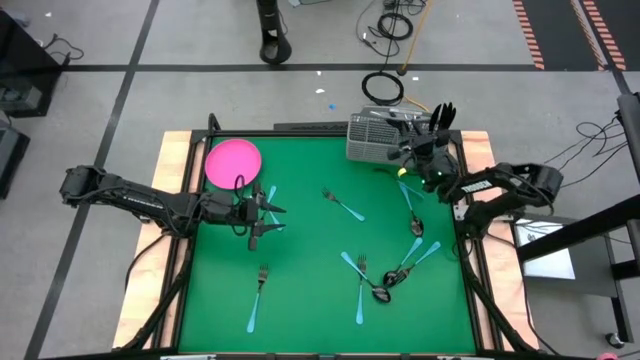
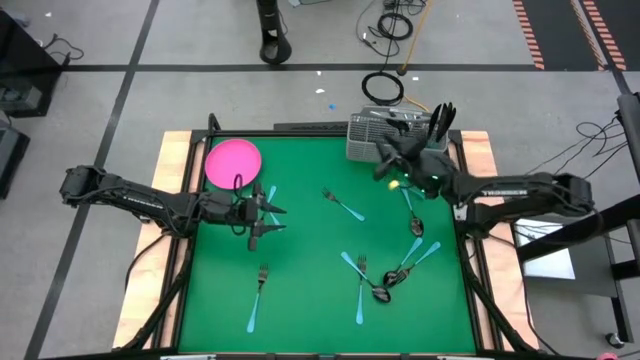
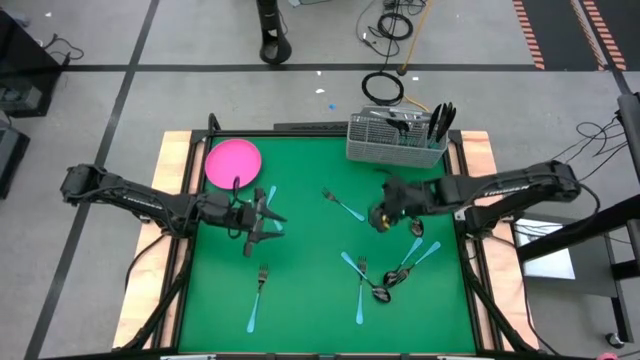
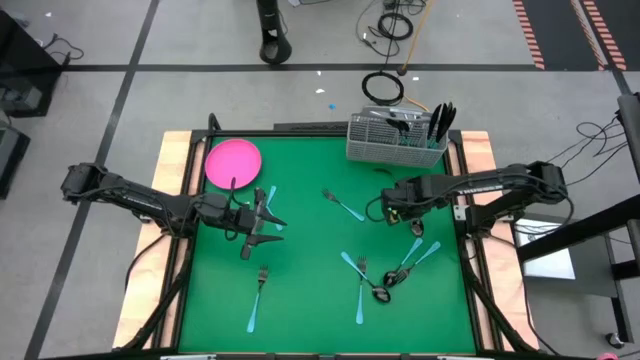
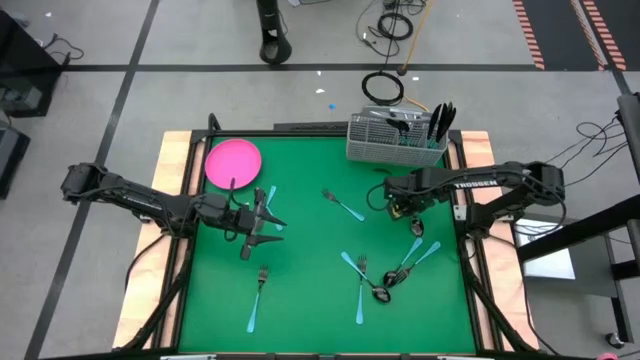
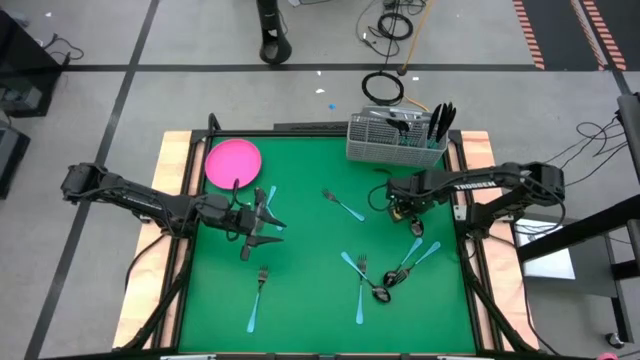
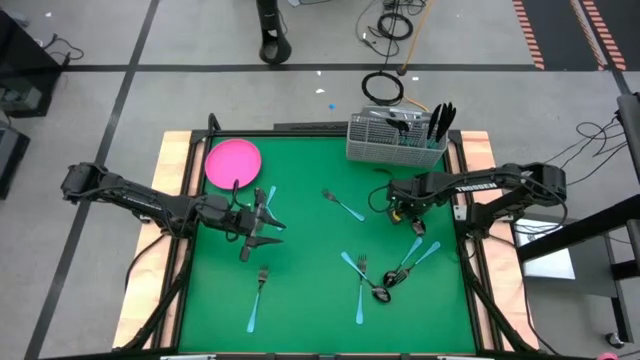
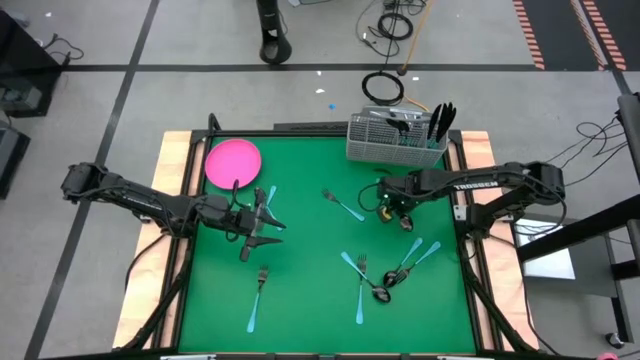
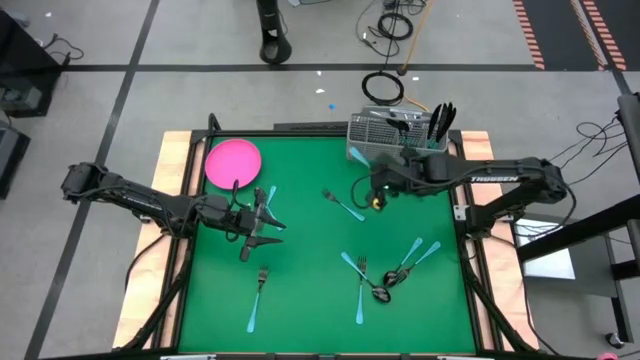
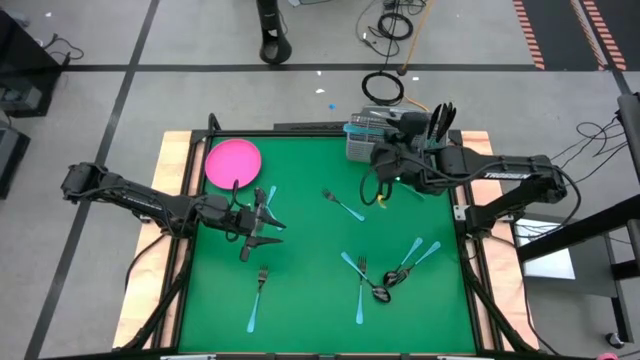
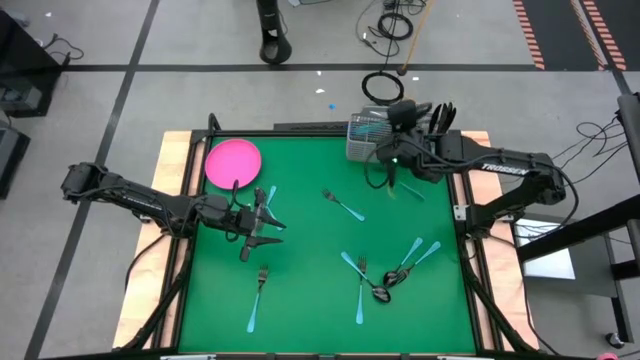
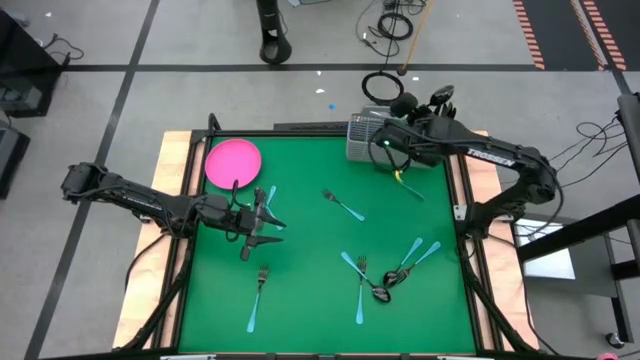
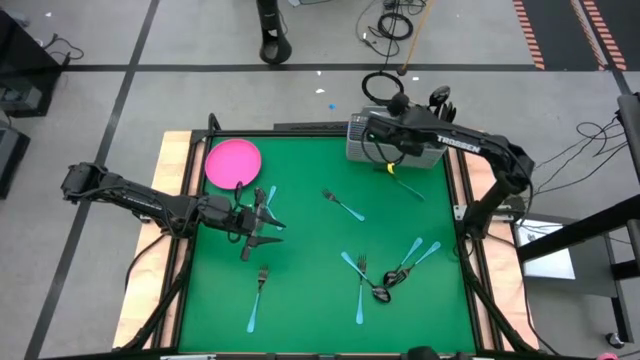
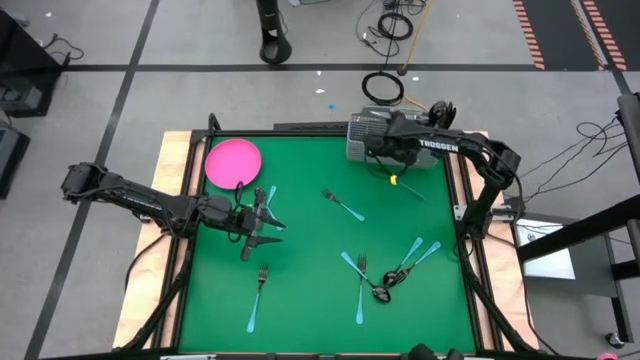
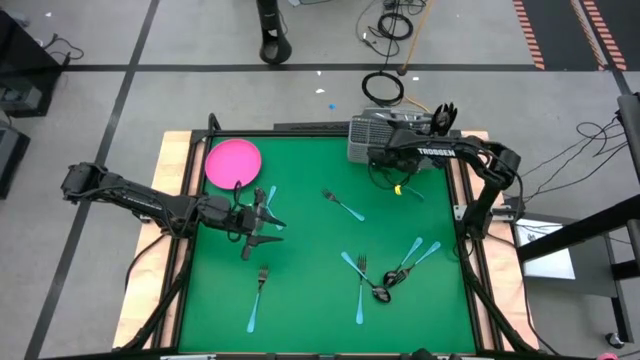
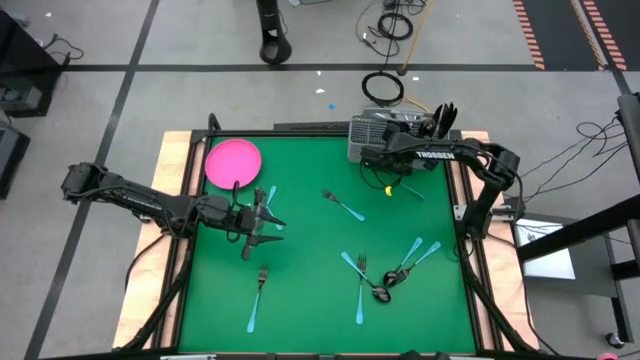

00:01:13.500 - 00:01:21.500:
Task: Sort silverware
Put the blue spoon into the gray silverware basket

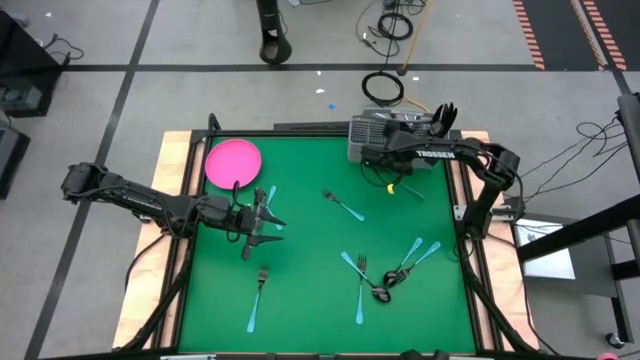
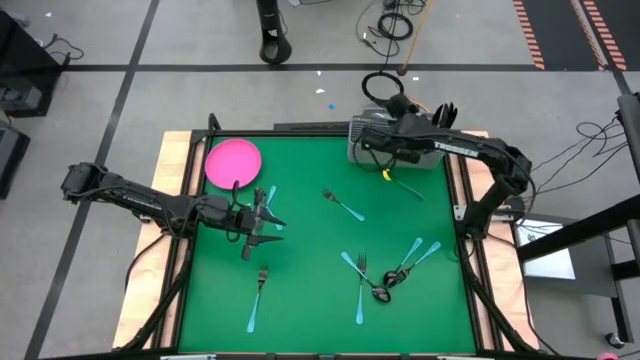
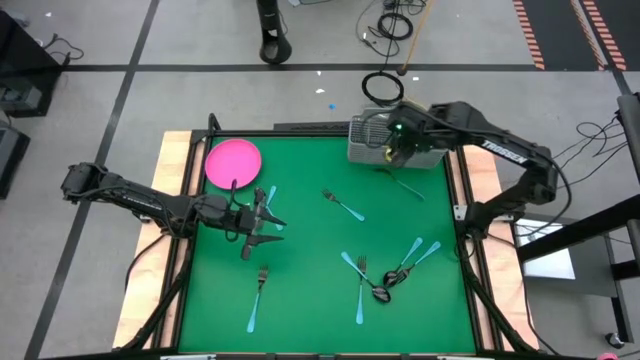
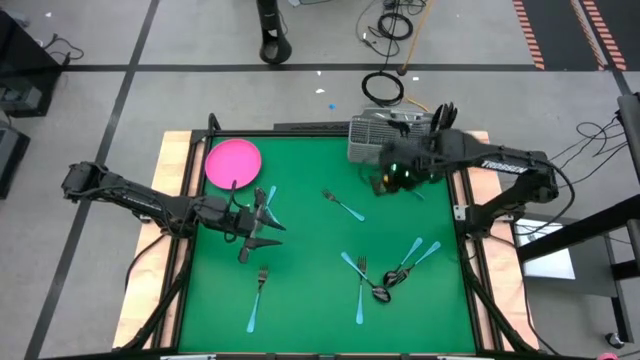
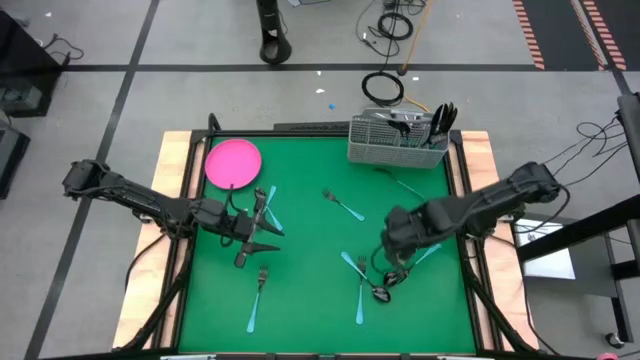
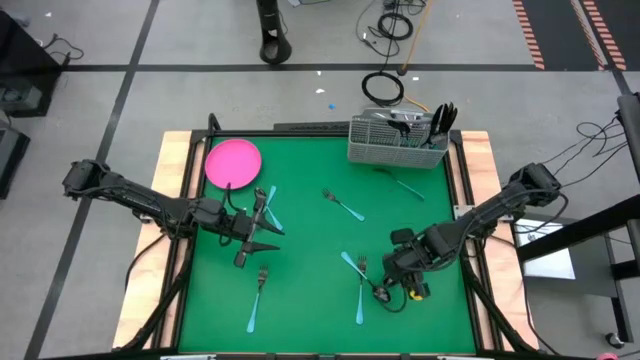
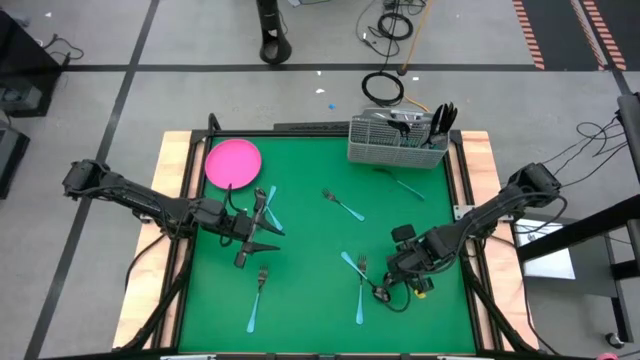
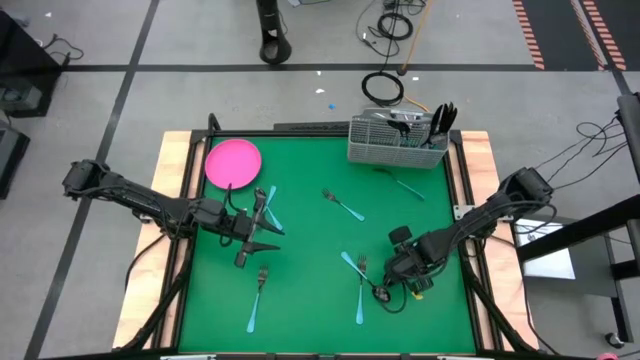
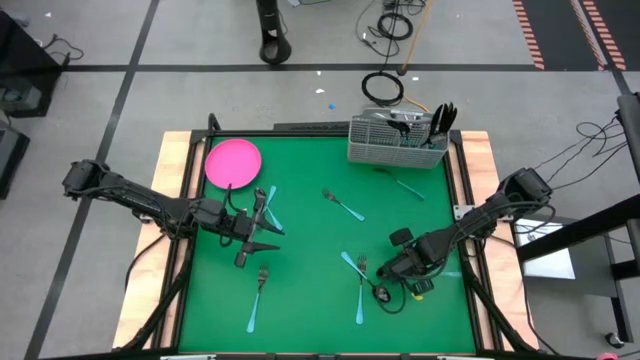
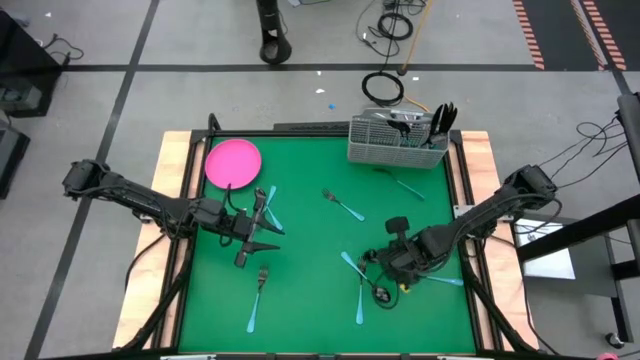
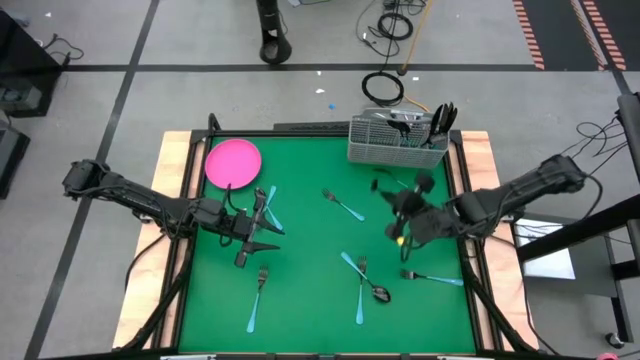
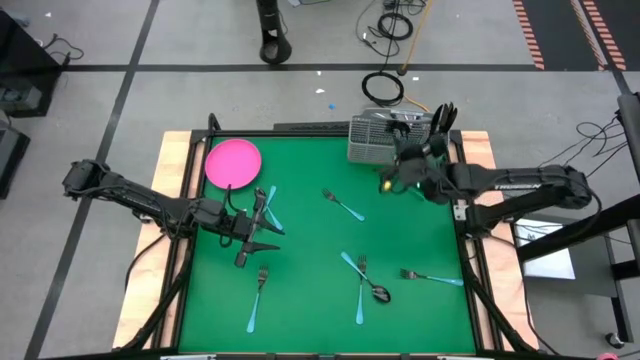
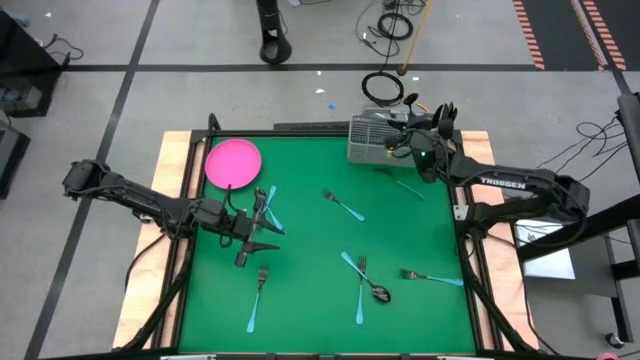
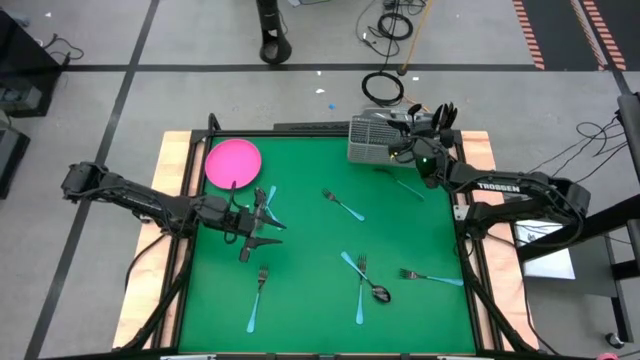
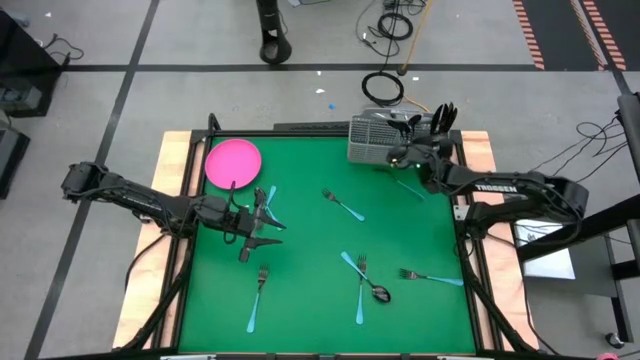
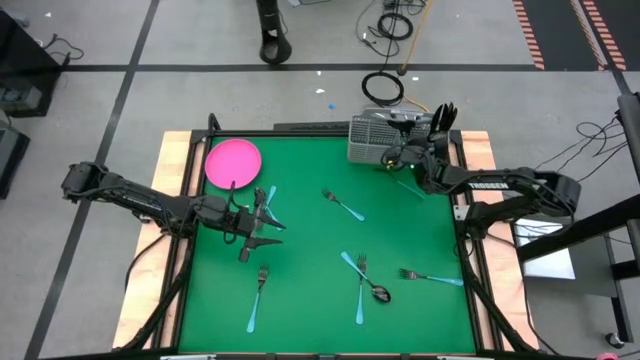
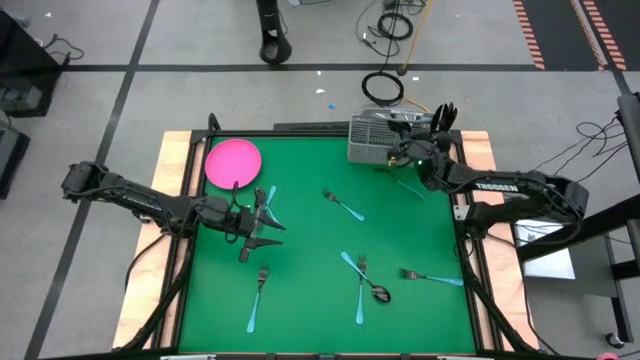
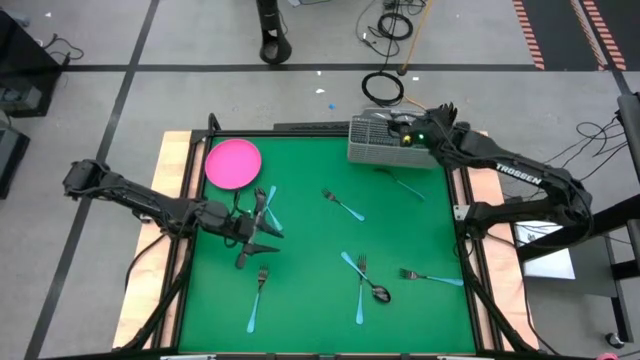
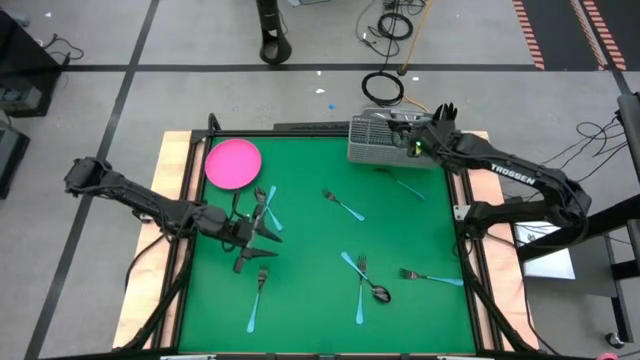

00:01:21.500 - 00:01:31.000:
Put the blue spoon into the gray silverware basket

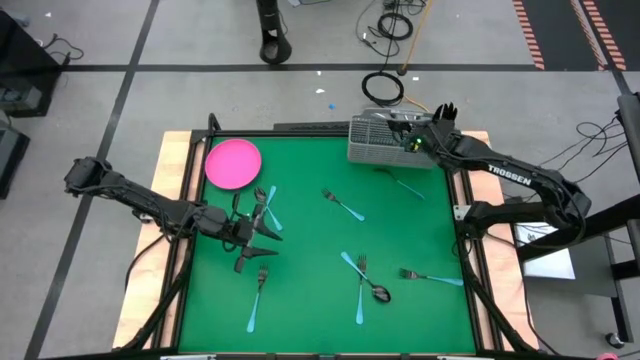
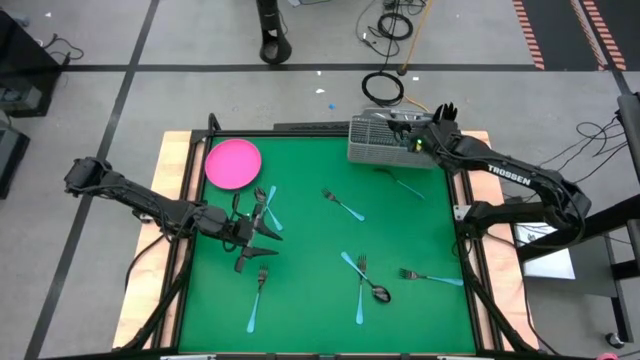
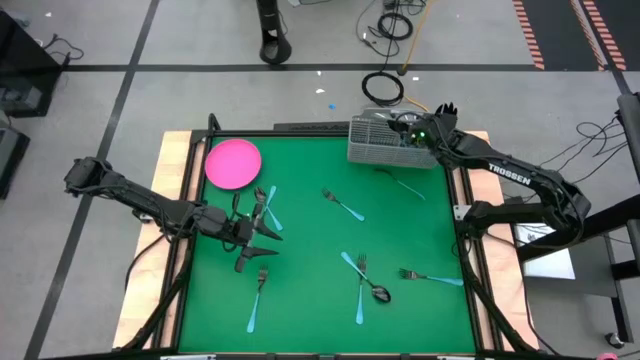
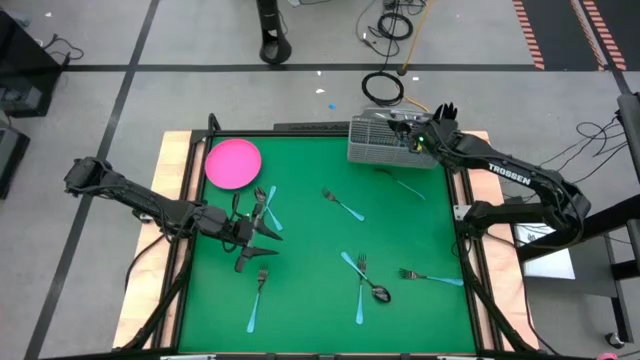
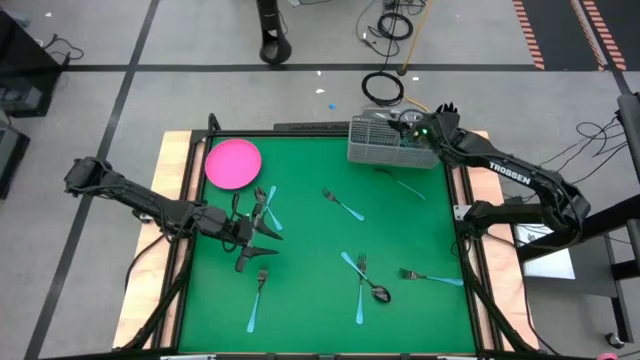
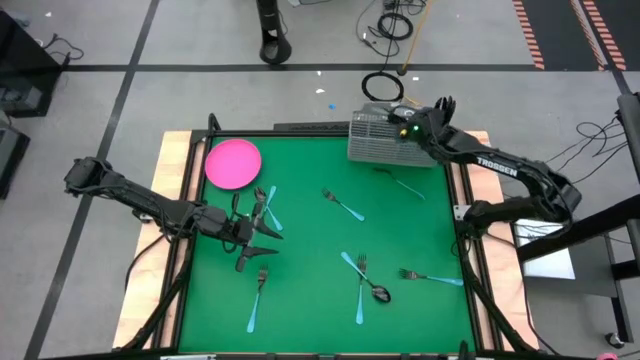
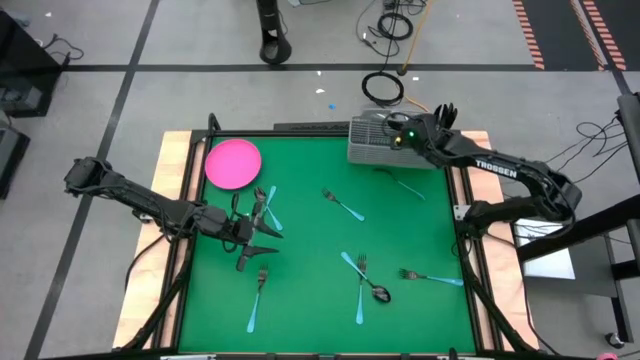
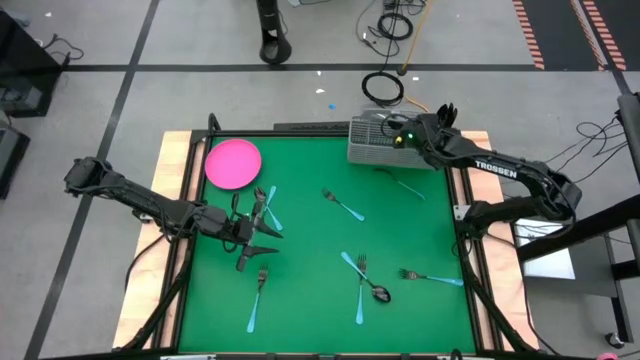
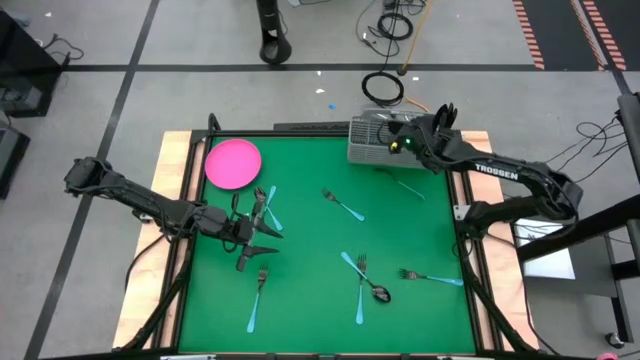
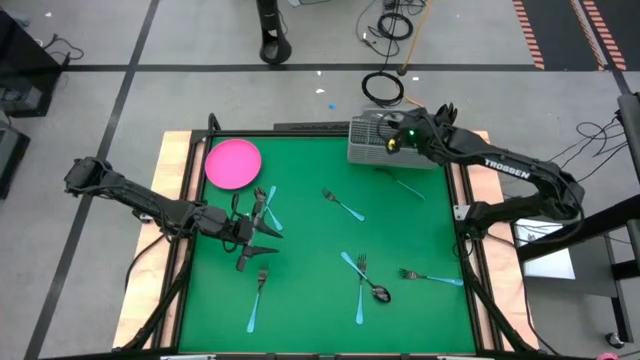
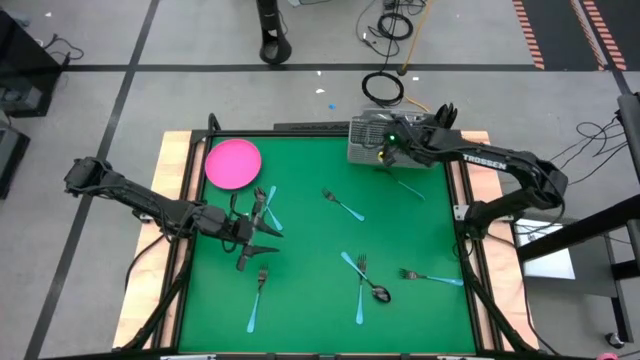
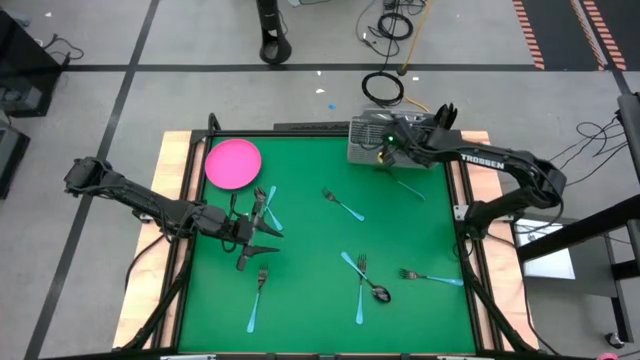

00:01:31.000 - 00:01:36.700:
Adjust the blue spoon in the gray silverware basket
